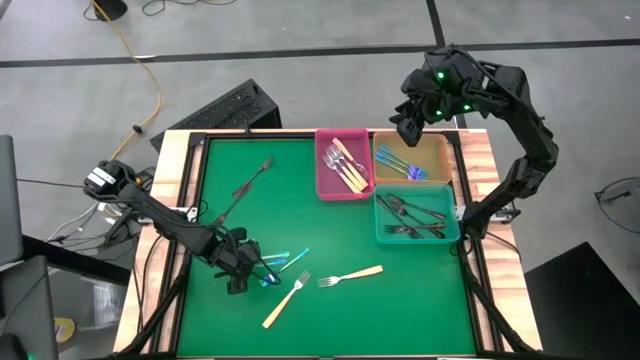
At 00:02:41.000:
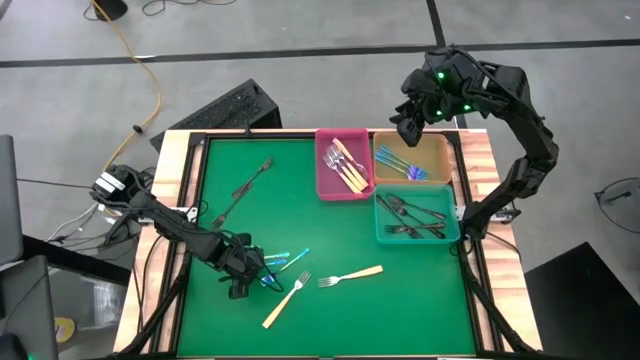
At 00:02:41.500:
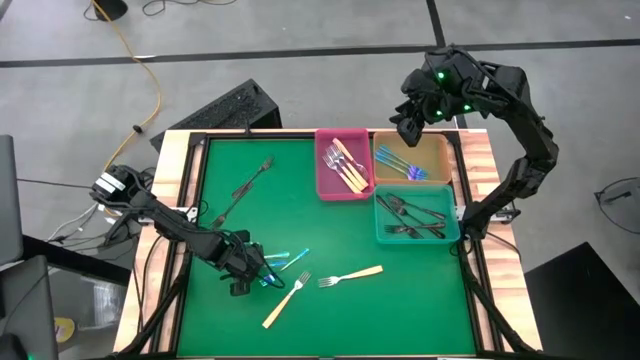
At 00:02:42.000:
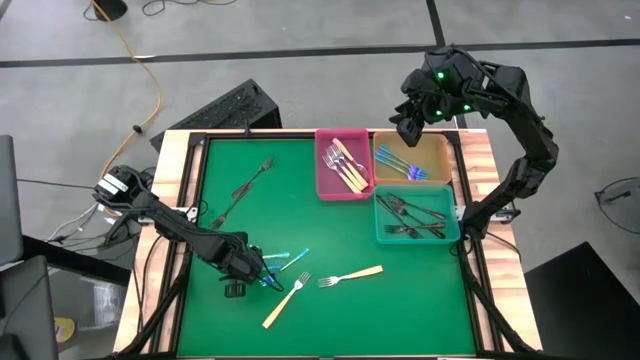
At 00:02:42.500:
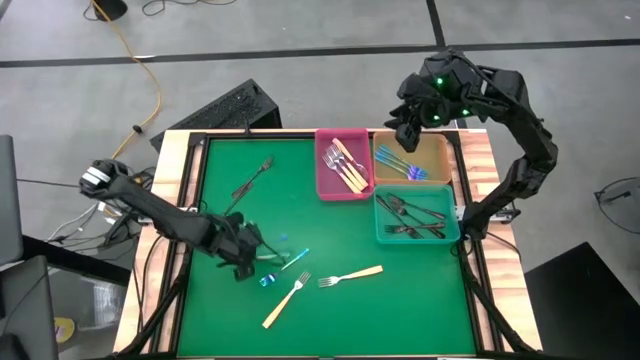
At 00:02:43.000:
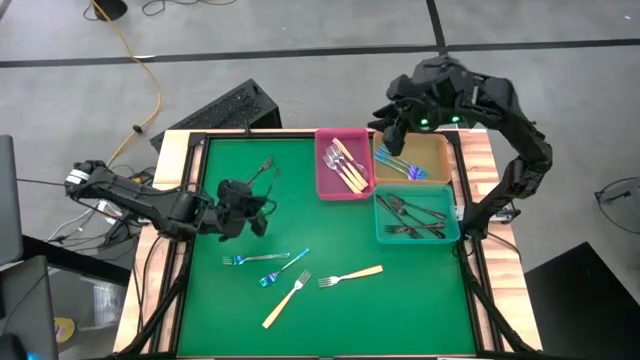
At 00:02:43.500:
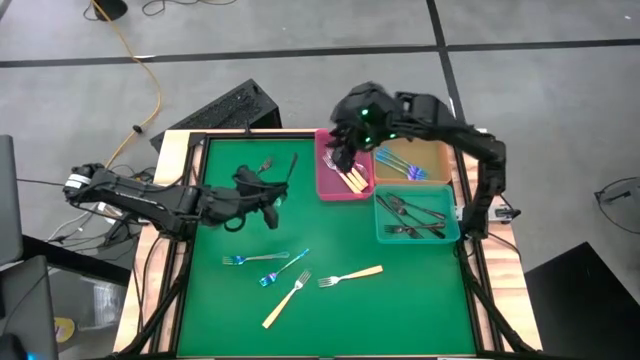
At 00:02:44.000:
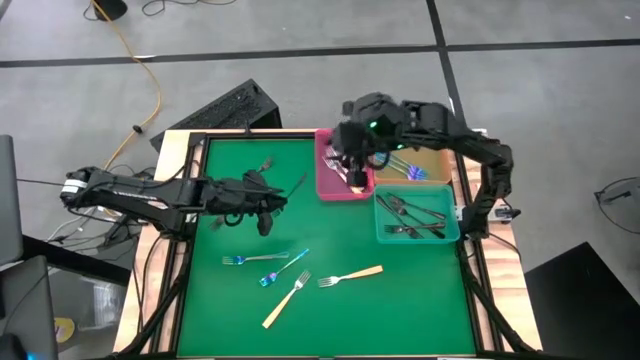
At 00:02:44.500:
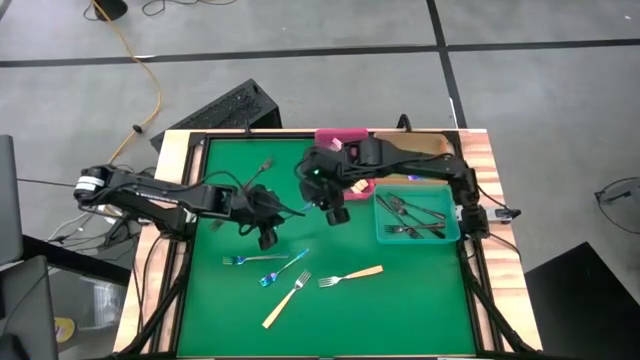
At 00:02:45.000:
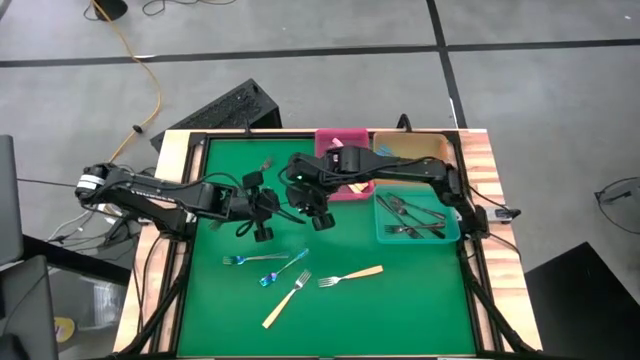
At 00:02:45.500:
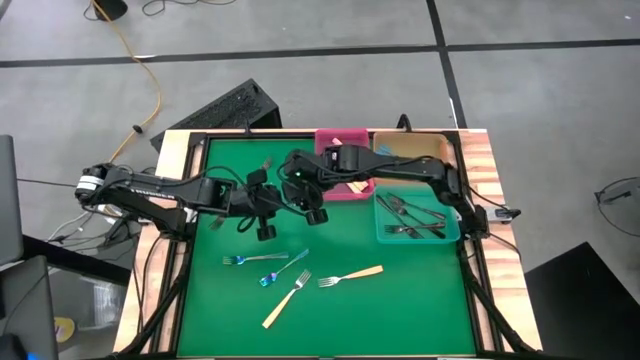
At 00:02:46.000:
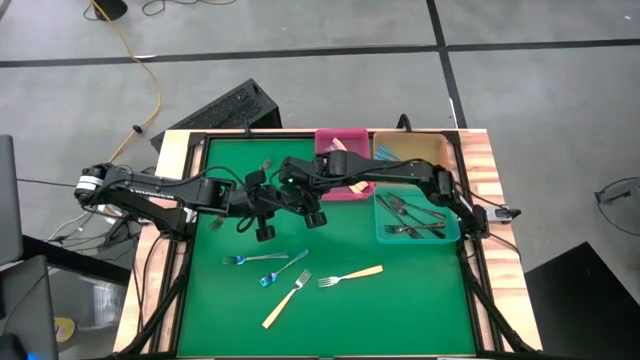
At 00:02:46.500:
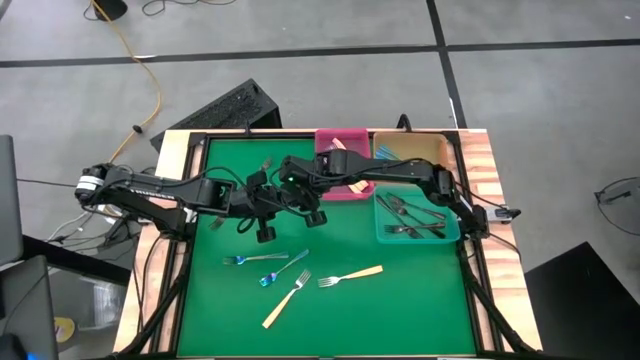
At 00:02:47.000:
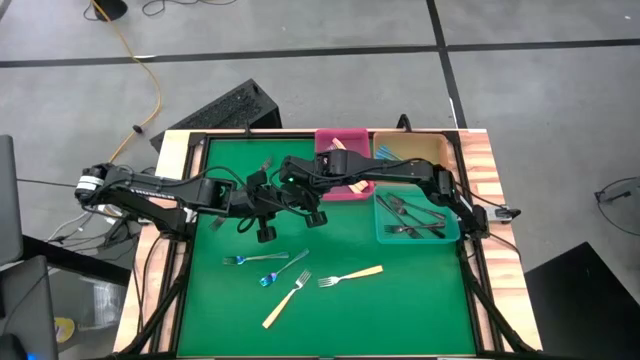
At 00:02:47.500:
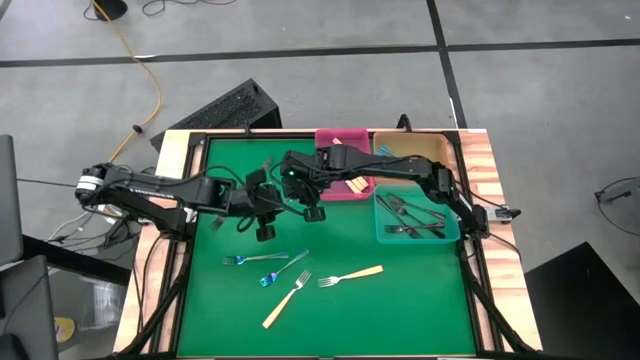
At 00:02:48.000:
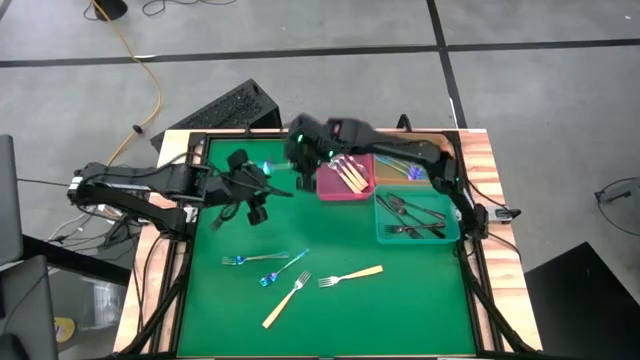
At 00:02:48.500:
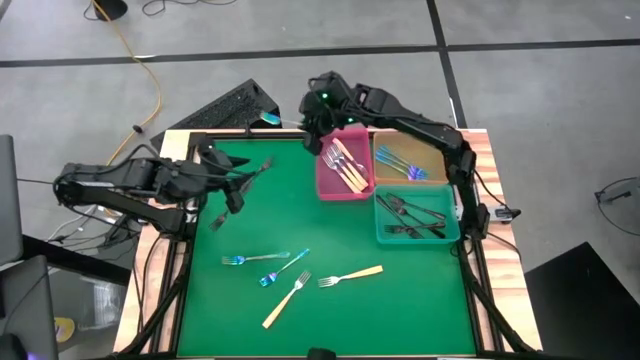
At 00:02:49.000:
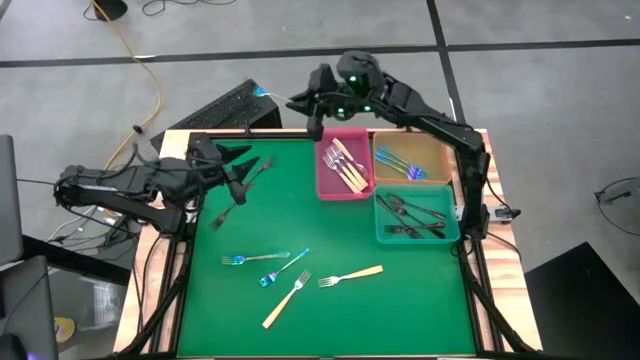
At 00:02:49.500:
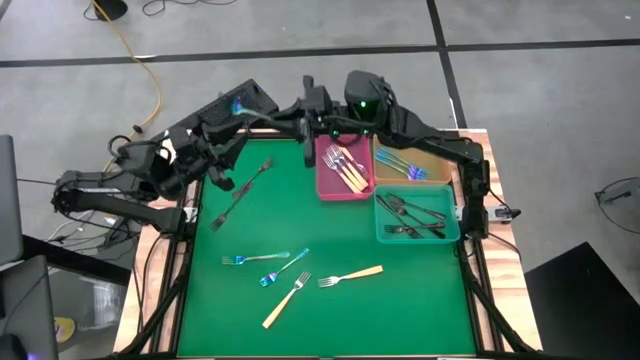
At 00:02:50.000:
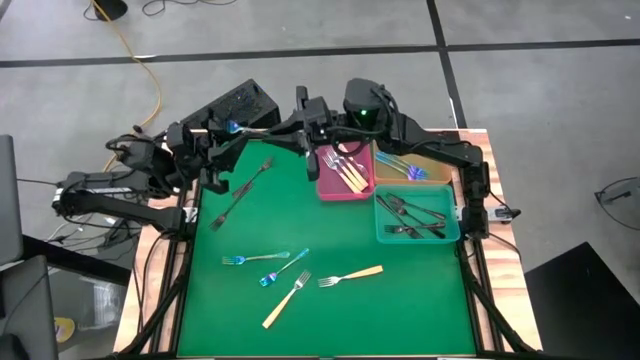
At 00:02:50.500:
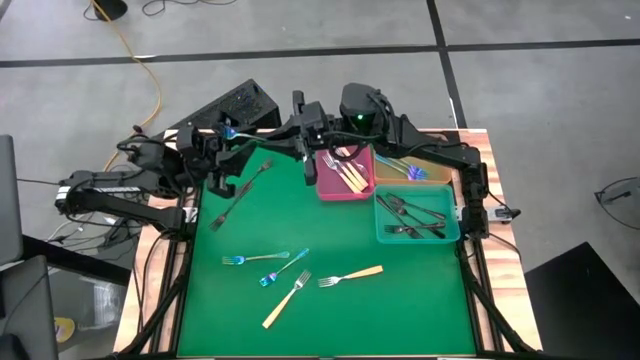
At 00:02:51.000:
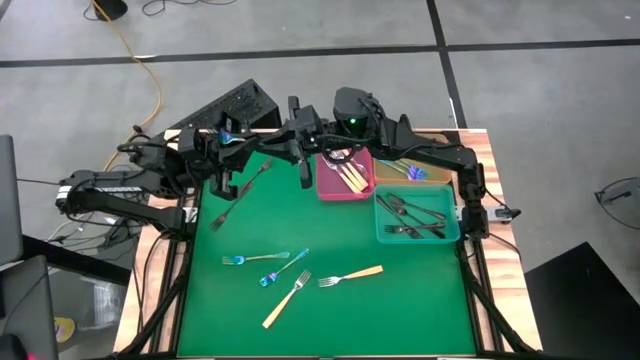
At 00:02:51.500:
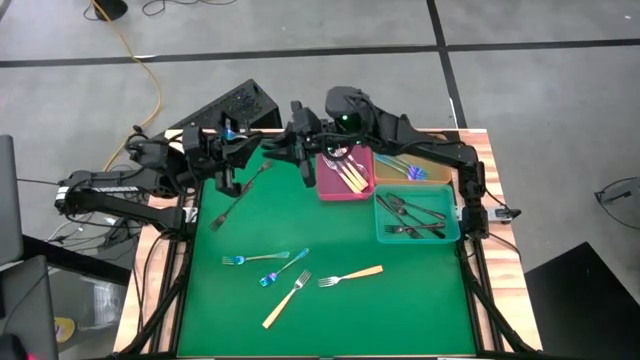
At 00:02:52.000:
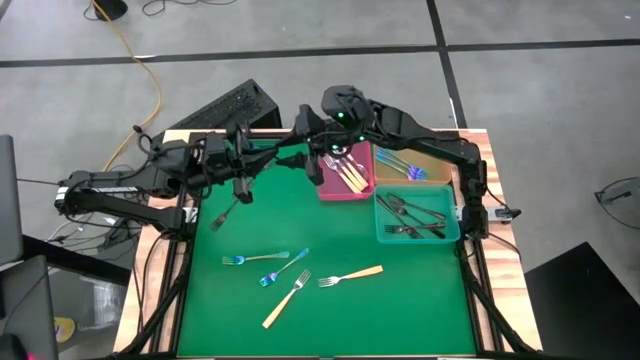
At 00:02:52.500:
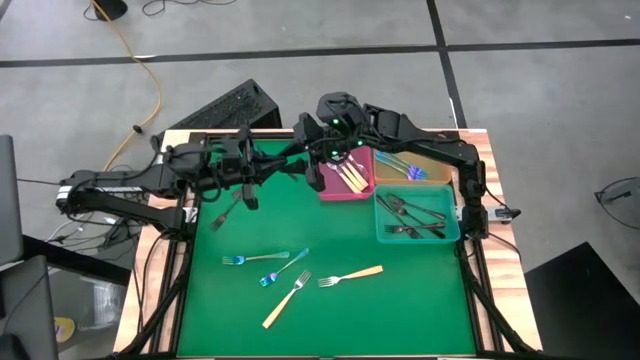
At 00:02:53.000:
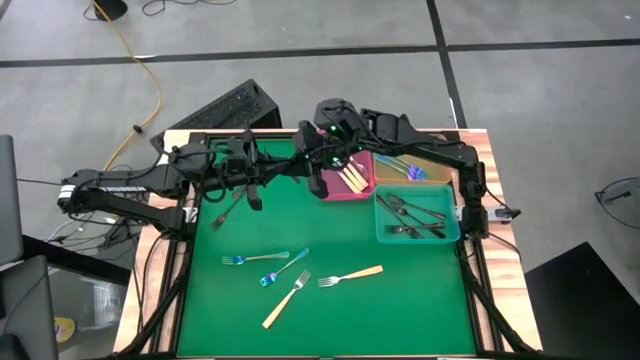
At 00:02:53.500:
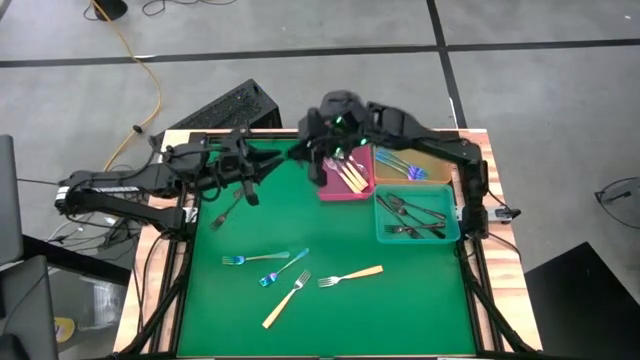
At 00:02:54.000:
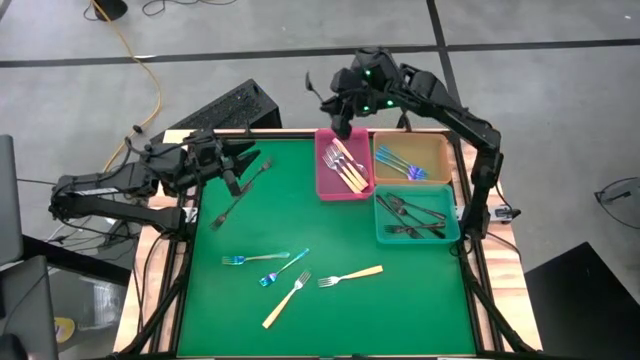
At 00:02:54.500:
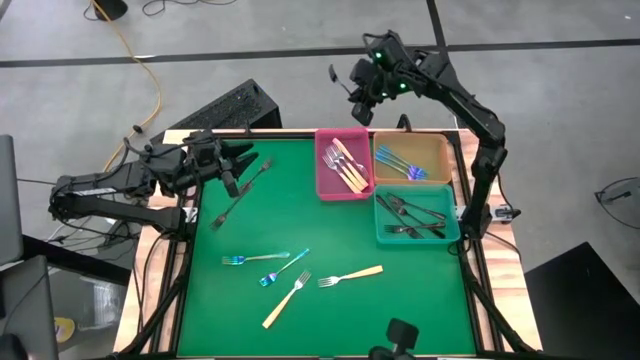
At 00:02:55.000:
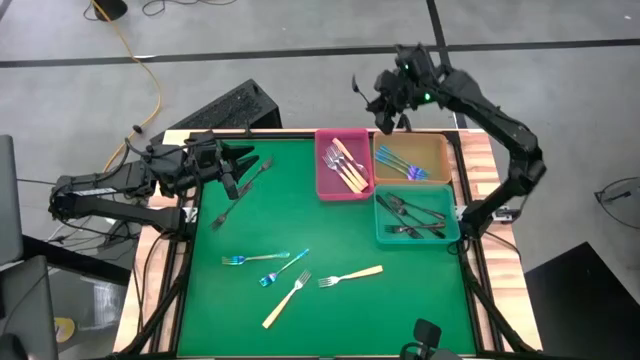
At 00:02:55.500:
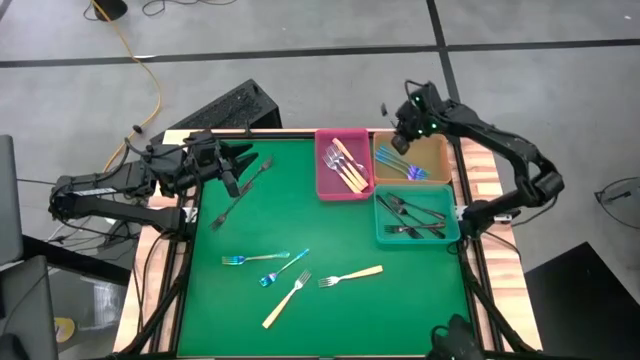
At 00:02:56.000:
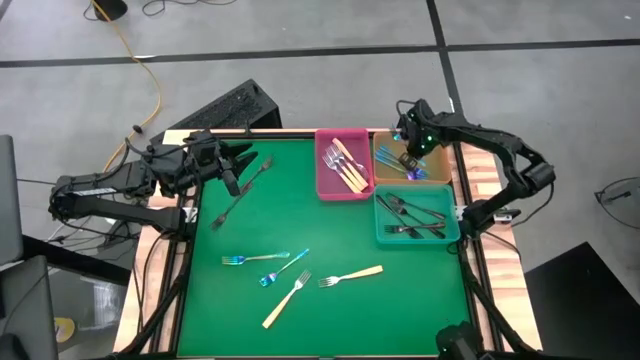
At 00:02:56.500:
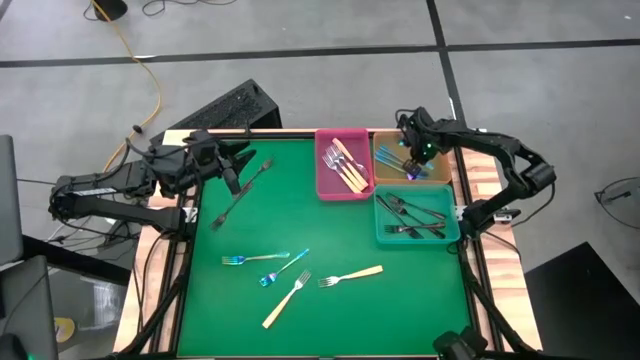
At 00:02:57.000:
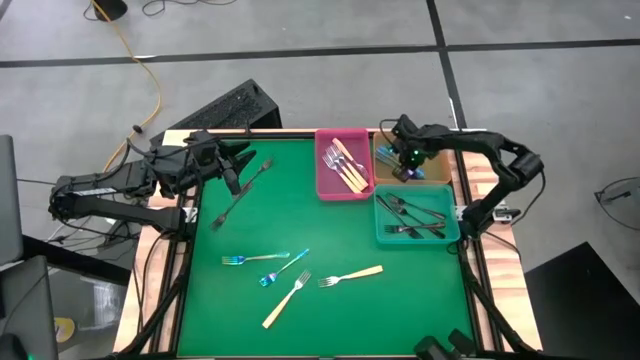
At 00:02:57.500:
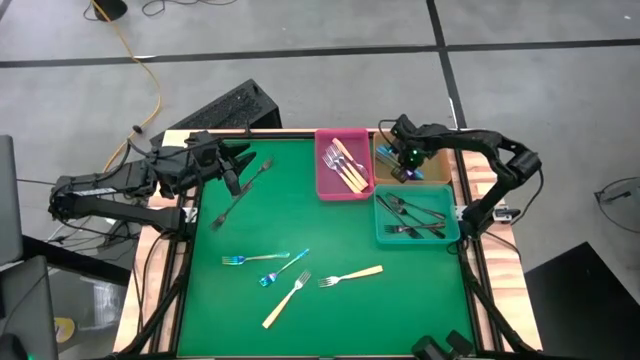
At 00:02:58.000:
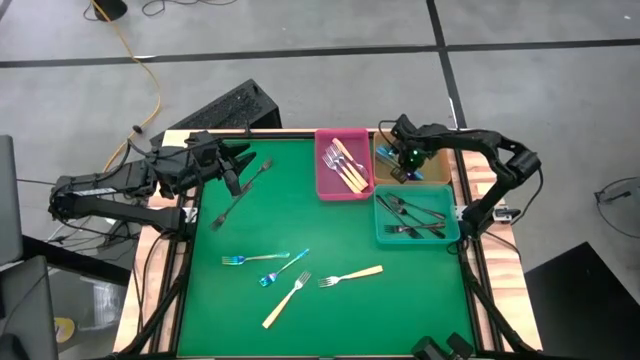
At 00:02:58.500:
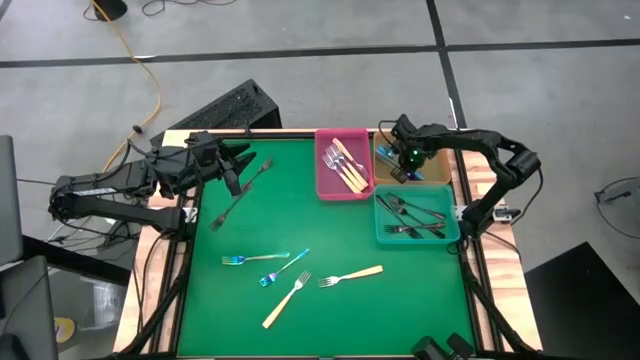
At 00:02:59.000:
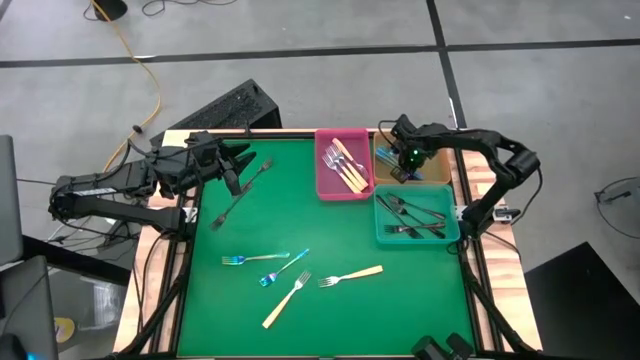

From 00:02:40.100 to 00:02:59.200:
Task: Sort silverware by color (type)
Put the blue fork into the orange bin

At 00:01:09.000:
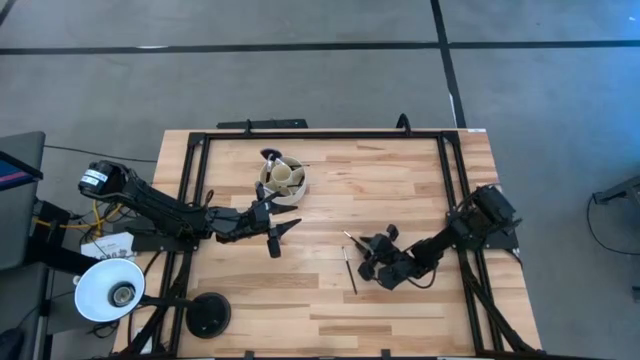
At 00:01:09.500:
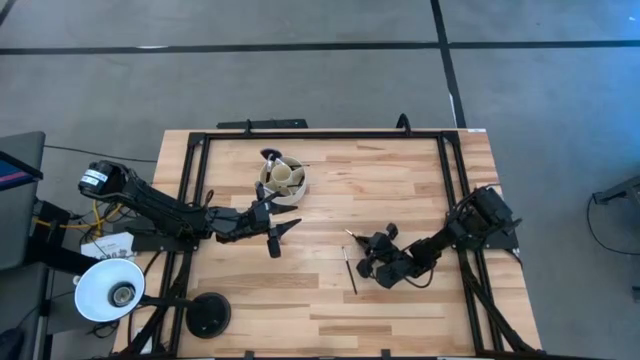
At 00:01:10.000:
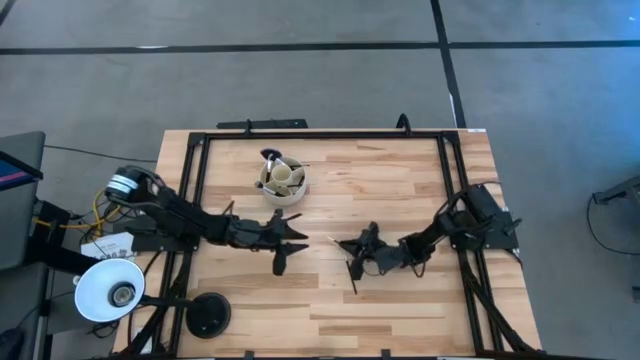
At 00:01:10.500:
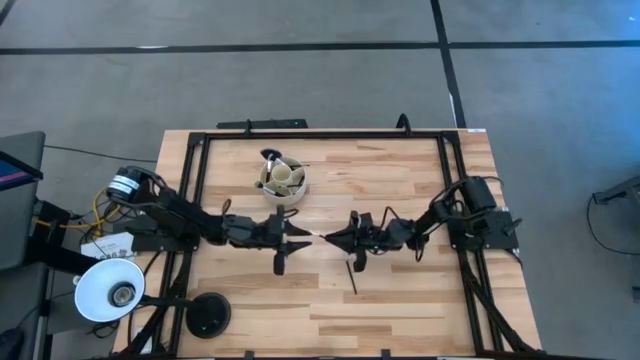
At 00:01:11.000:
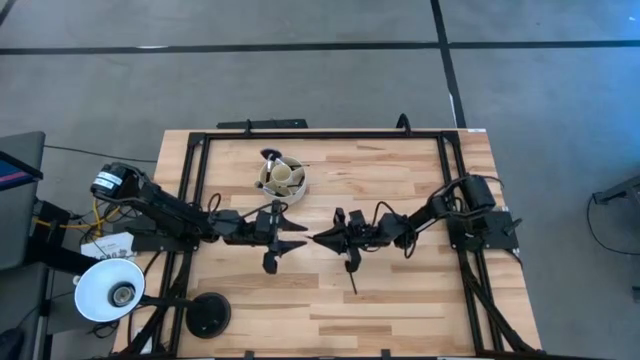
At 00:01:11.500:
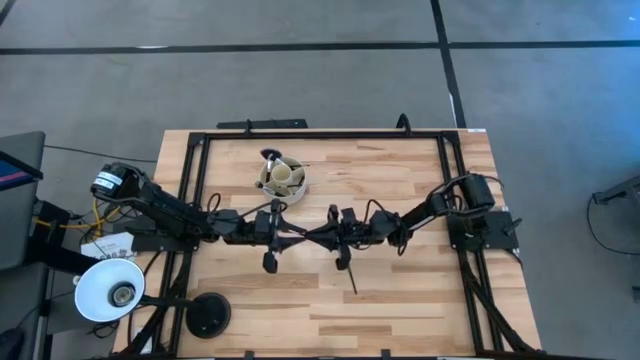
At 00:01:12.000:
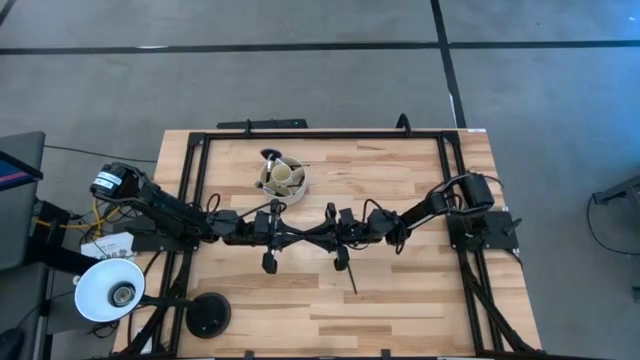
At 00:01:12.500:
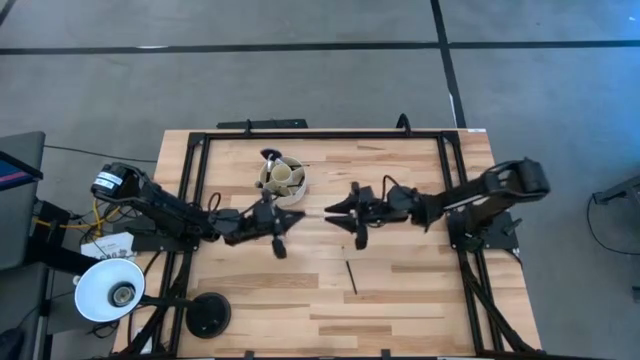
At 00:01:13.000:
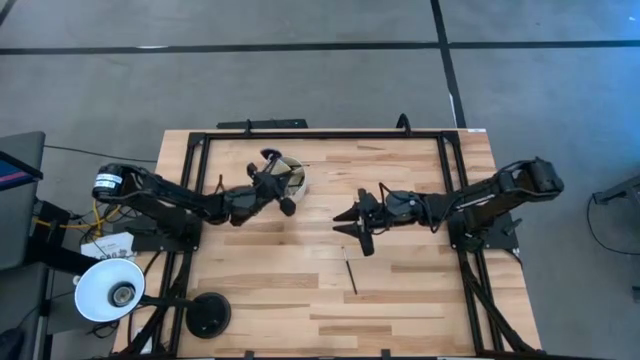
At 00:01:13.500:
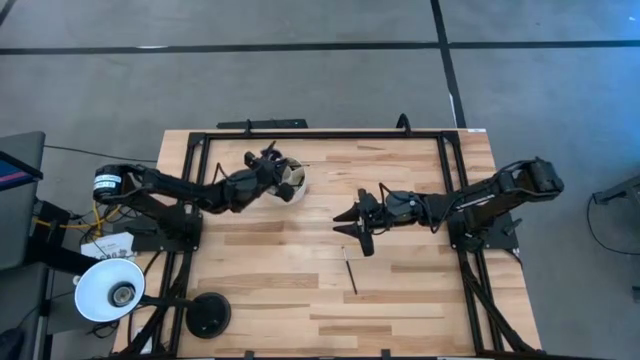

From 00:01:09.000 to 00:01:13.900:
Task: Sort items
Put the liner brush in the white organizer
